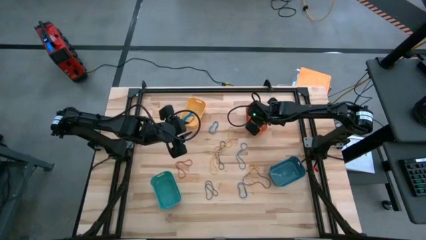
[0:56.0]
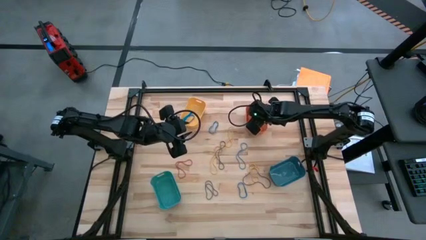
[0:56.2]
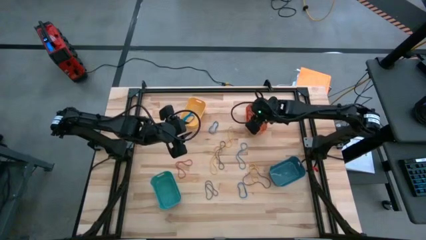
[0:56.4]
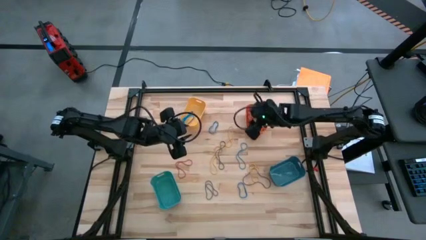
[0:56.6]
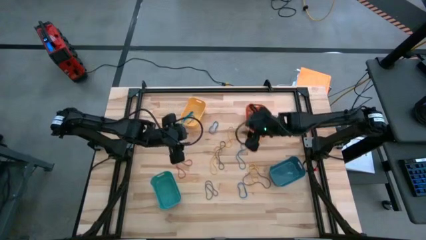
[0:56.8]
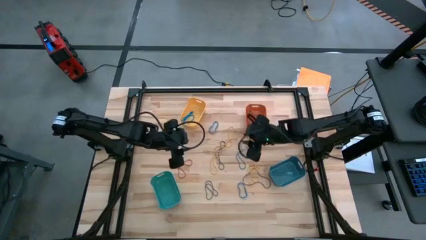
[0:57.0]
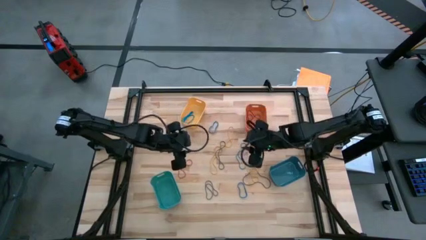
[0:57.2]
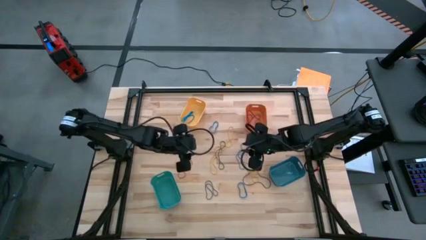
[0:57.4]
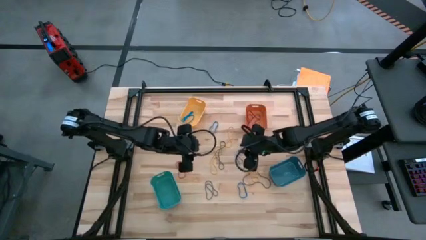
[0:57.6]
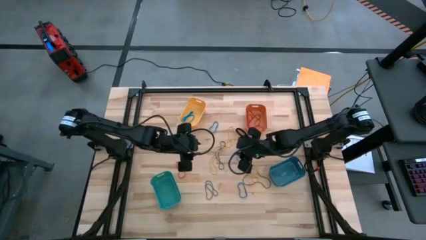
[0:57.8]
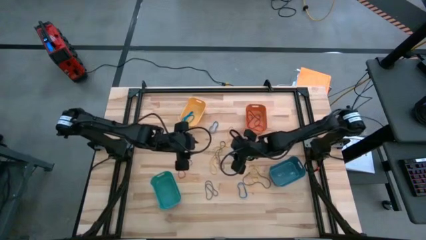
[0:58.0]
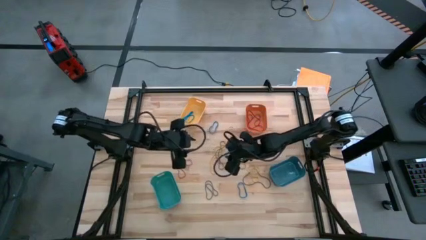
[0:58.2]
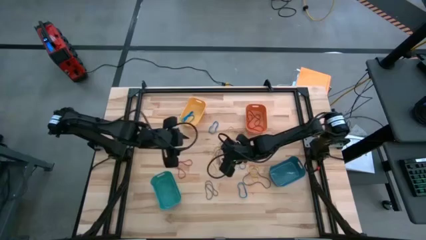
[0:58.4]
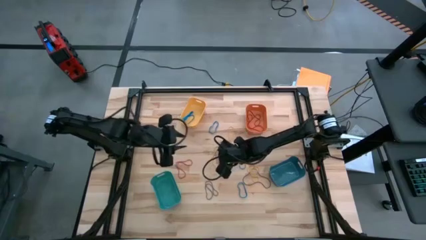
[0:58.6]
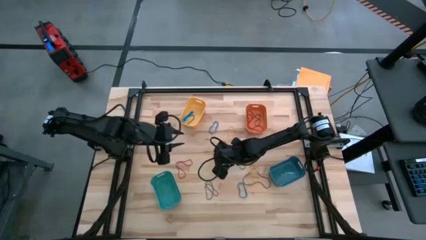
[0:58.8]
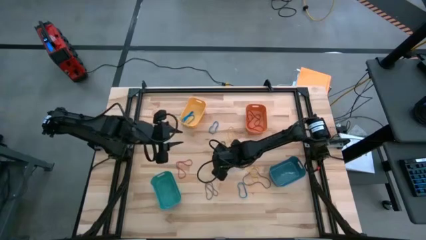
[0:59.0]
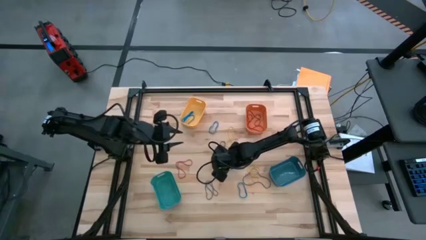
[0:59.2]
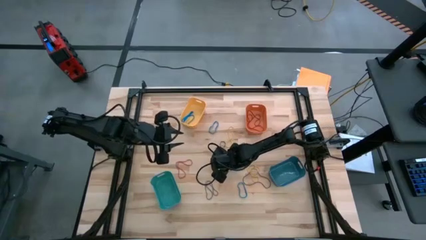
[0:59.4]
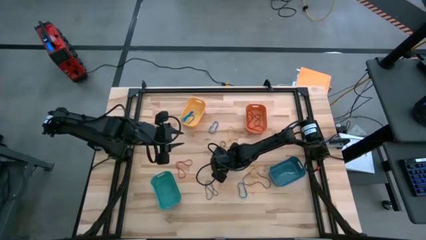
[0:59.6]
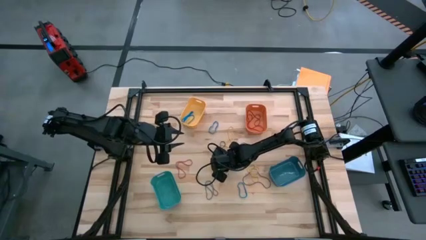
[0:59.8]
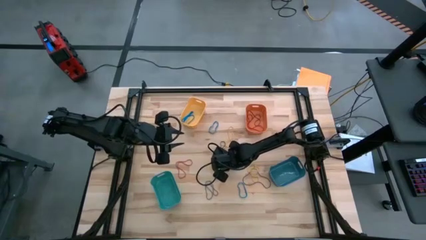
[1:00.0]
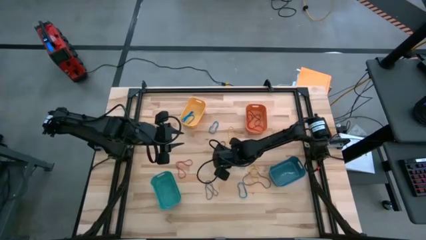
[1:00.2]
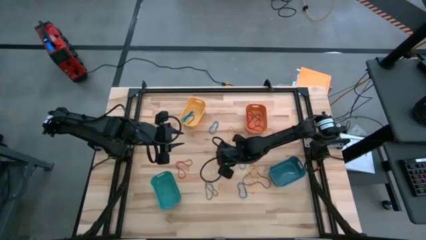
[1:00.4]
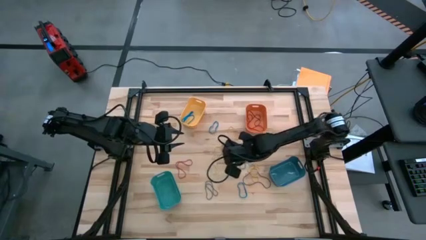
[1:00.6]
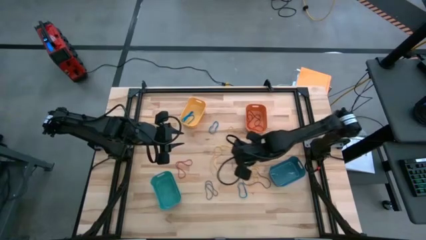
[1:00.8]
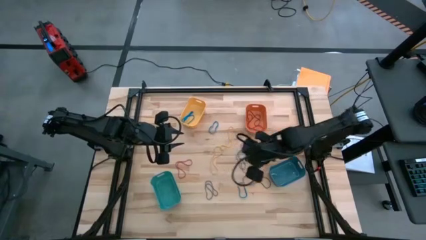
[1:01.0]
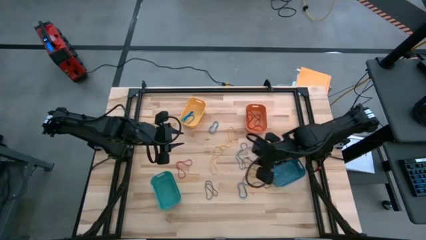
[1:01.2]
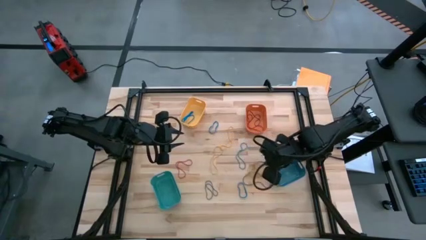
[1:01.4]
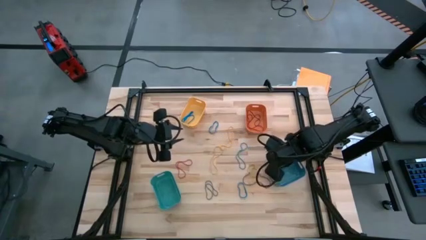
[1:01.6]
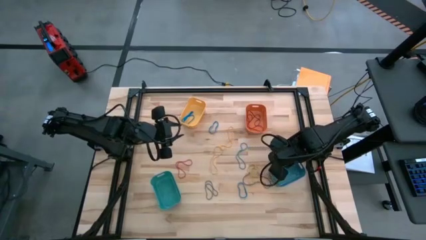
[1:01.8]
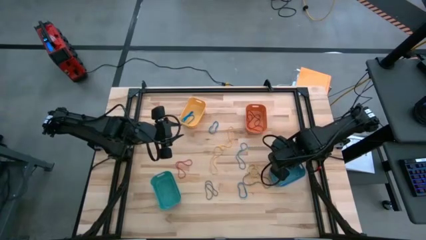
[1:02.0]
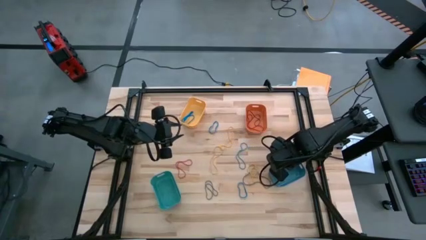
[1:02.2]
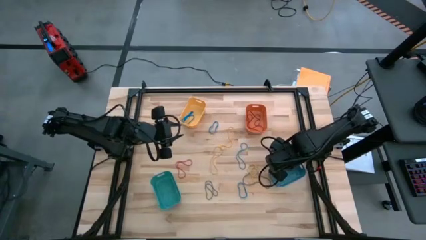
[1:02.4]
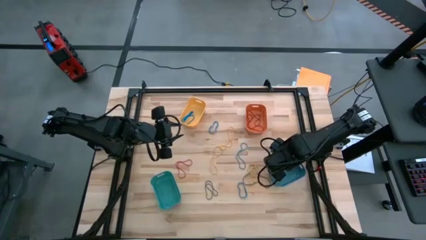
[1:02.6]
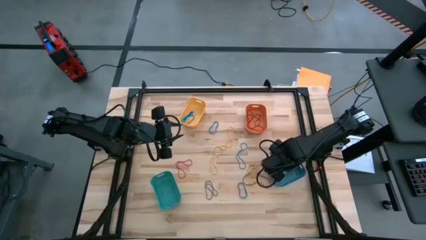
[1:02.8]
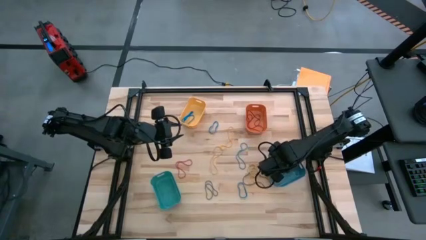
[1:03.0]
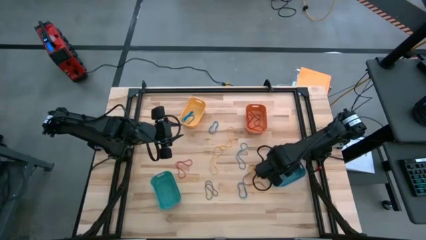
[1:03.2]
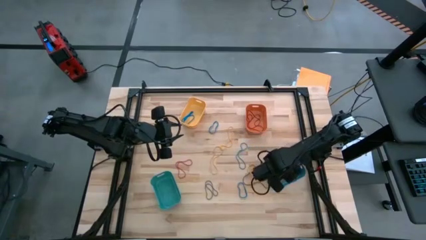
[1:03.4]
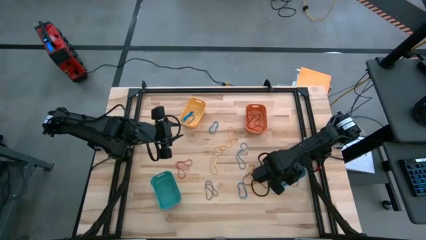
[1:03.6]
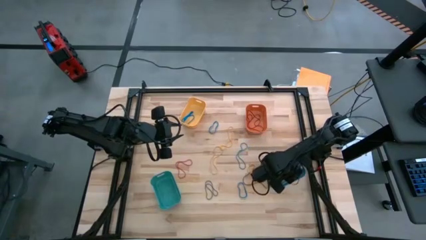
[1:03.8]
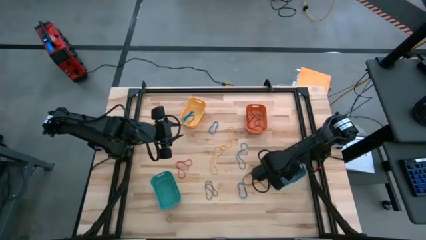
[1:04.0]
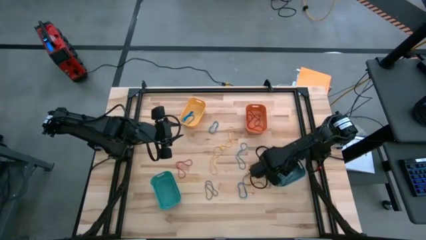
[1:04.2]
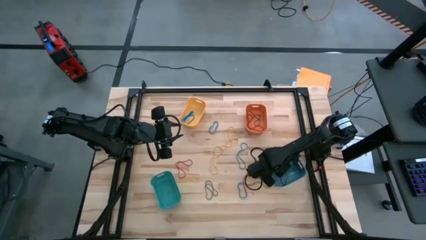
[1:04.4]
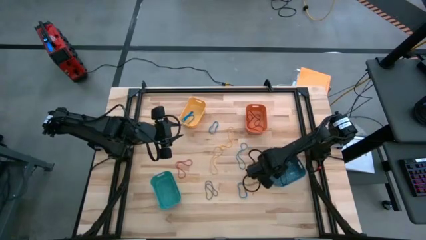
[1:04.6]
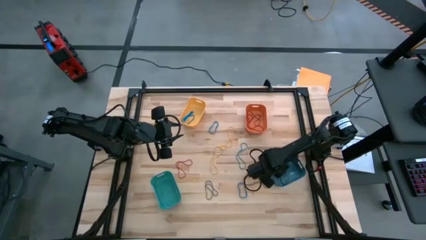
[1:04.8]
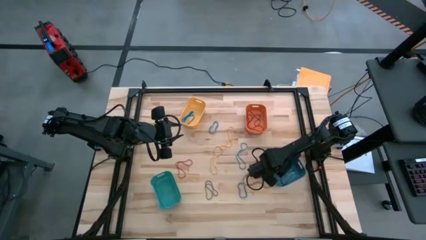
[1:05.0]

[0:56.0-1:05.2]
Task: Sort rubber bands into baskets
Put the violet rubber band into the blue bin

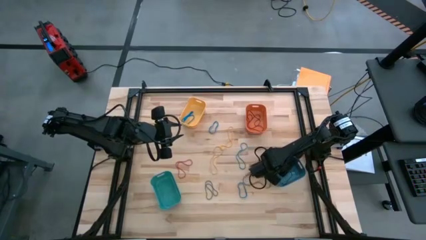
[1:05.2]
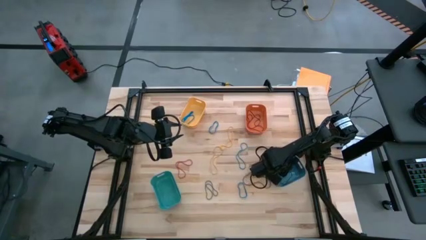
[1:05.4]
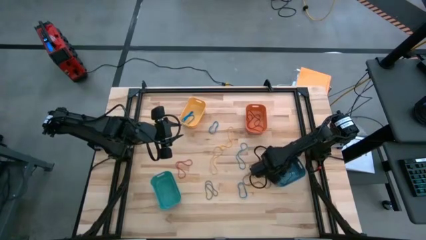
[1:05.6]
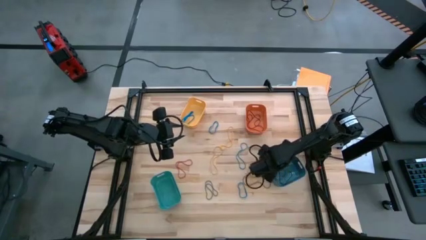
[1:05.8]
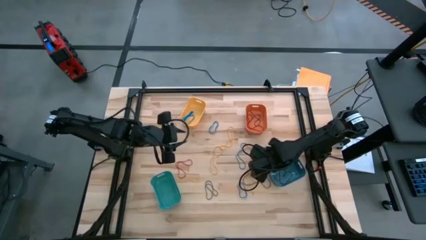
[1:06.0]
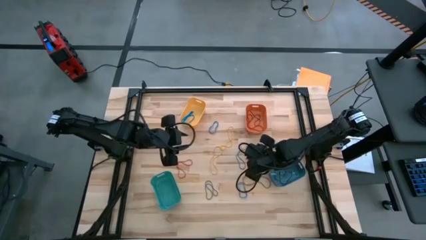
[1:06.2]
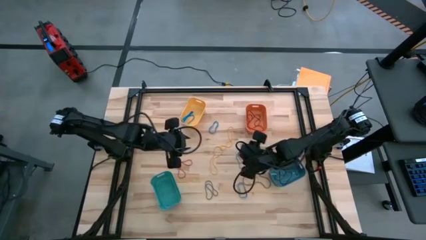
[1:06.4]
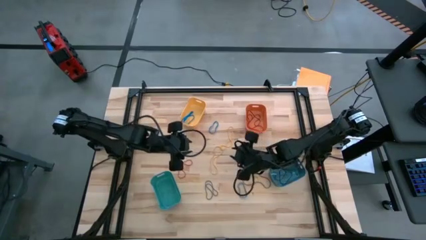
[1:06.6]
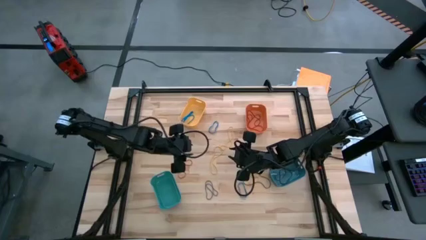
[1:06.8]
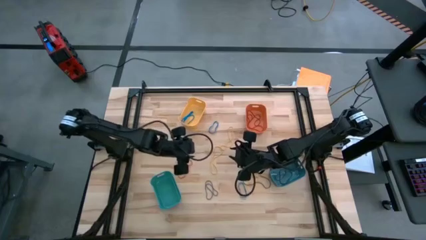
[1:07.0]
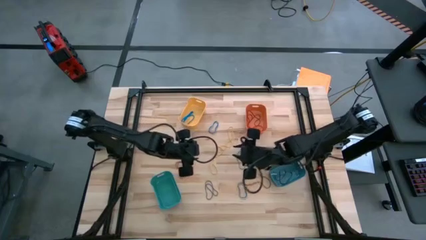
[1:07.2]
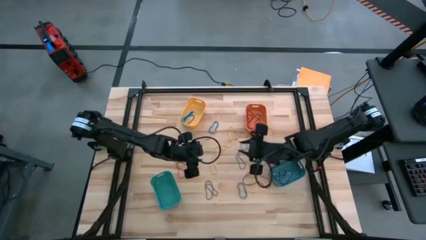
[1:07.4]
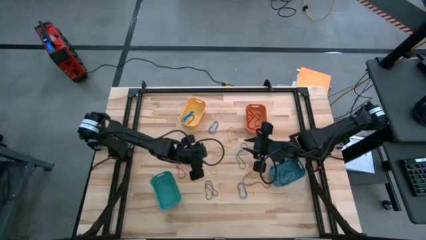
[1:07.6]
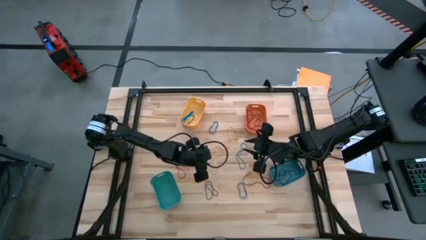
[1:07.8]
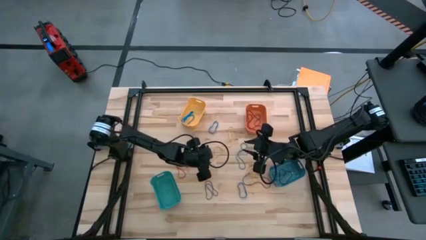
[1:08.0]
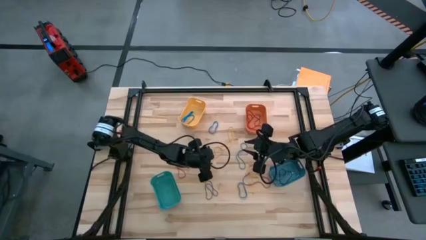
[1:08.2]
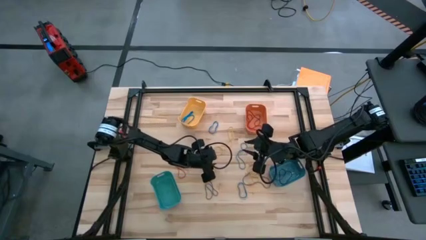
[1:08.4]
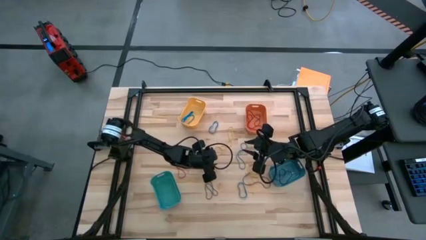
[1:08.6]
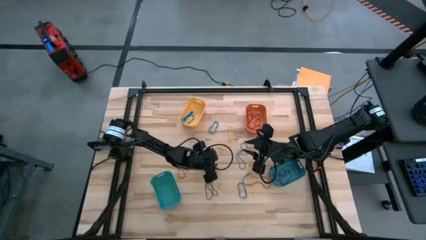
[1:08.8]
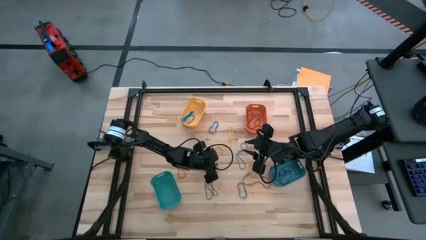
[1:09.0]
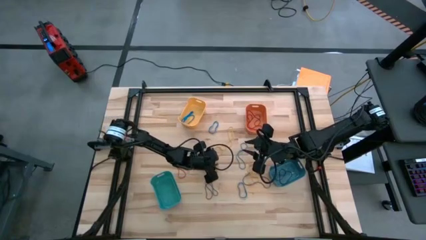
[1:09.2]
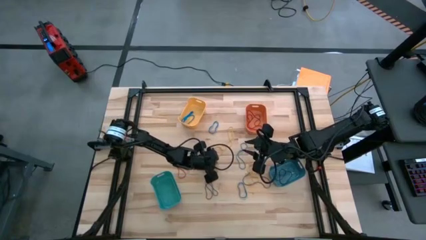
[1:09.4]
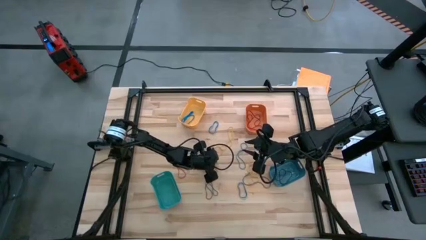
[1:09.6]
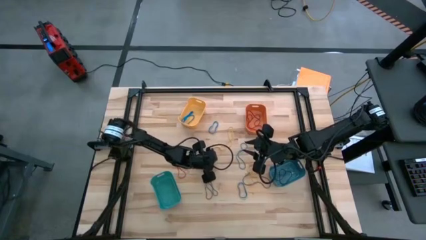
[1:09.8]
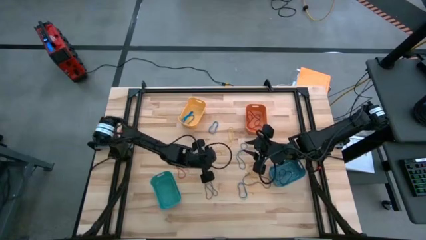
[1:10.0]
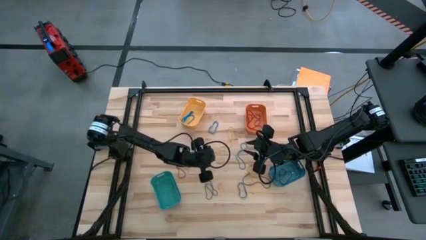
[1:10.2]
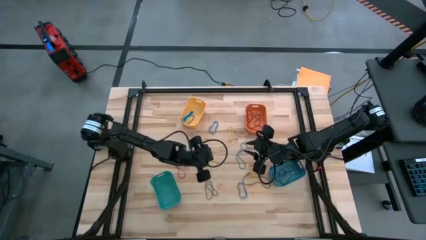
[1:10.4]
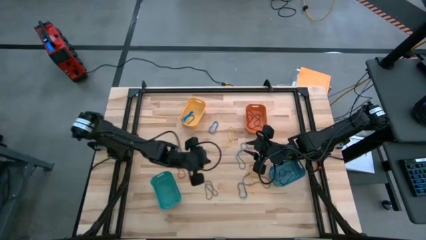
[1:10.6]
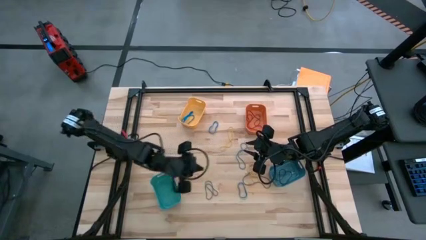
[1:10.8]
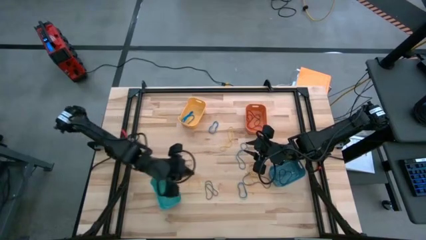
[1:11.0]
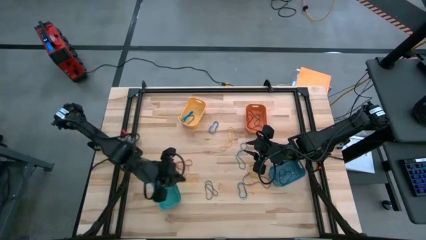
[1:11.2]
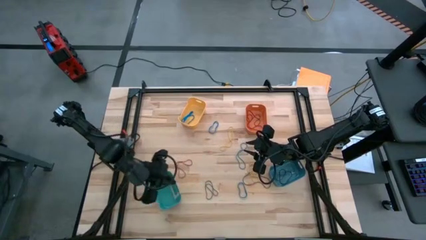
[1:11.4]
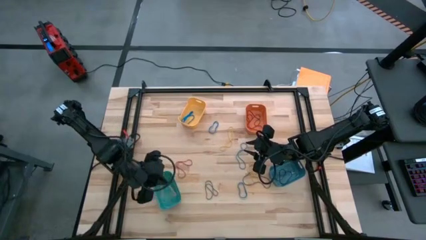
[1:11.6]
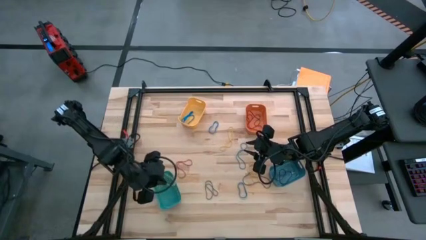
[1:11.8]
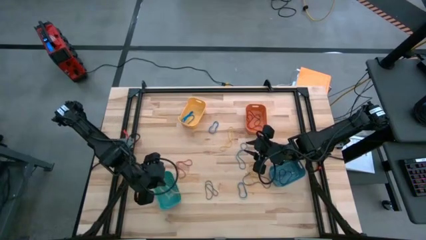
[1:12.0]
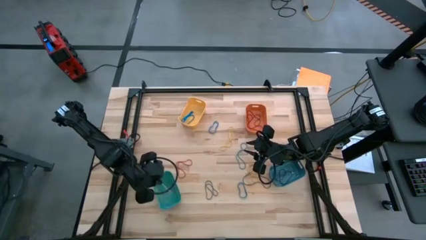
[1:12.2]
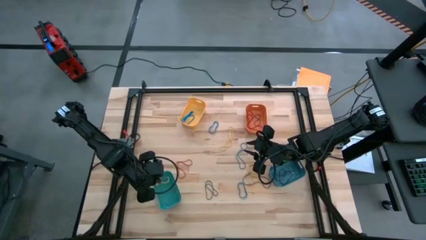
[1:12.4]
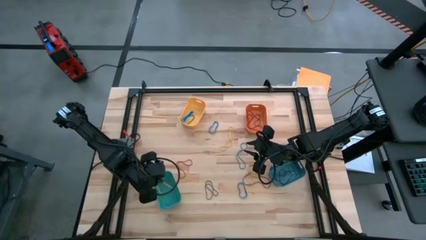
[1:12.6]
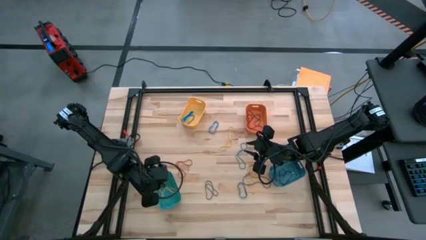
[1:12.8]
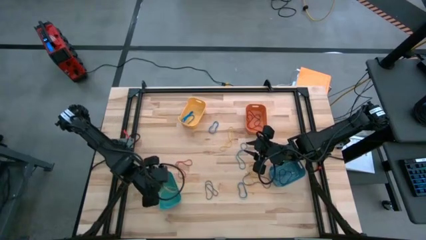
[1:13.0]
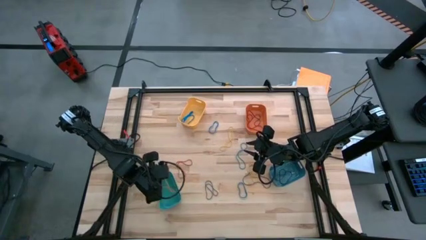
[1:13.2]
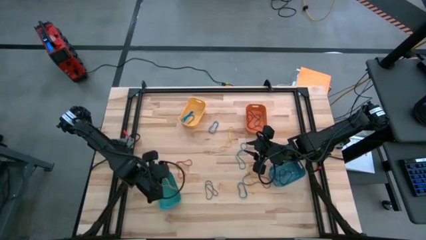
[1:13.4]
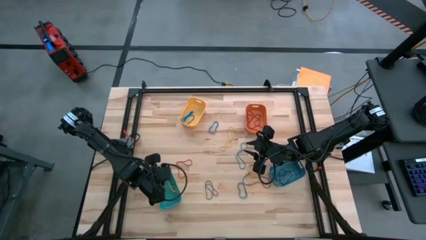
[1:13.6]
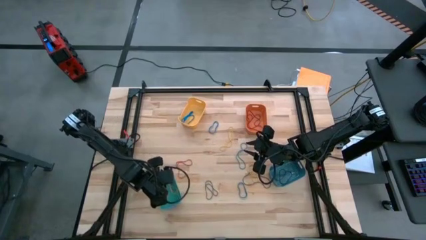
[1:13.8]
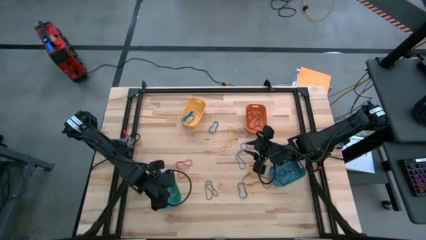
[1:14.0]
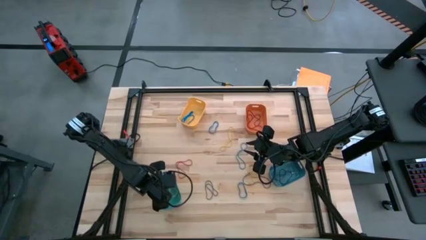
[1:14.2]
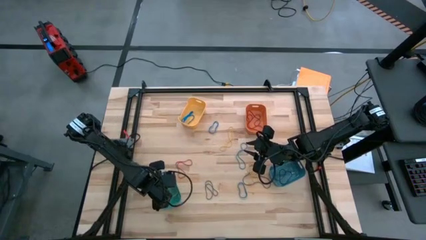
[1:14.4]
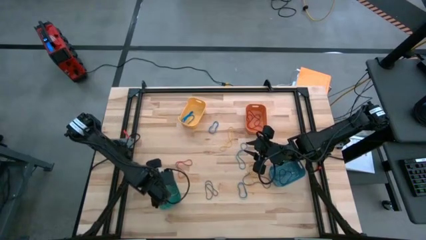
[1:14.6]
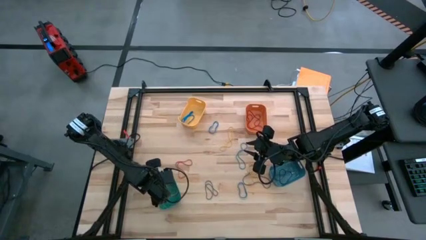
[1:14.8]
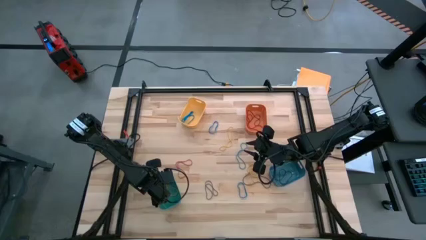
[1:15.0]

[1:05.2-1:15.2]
Put the yellow rubber band into the green bin
